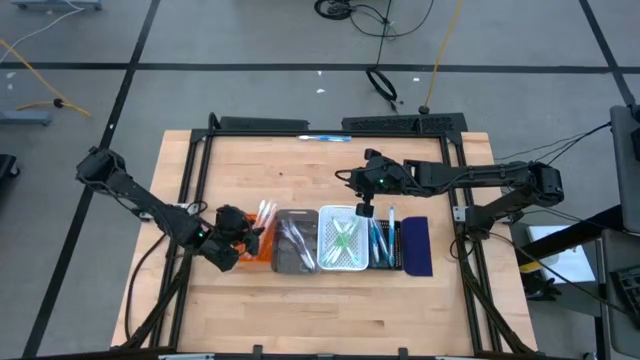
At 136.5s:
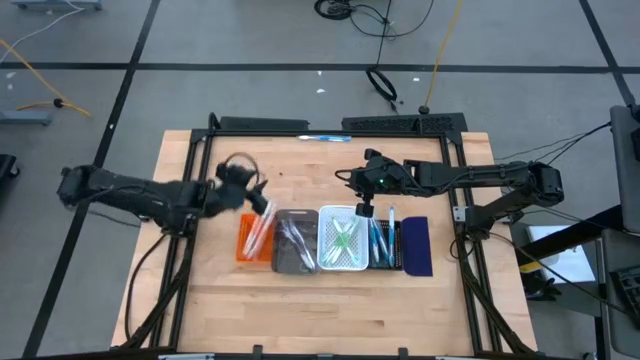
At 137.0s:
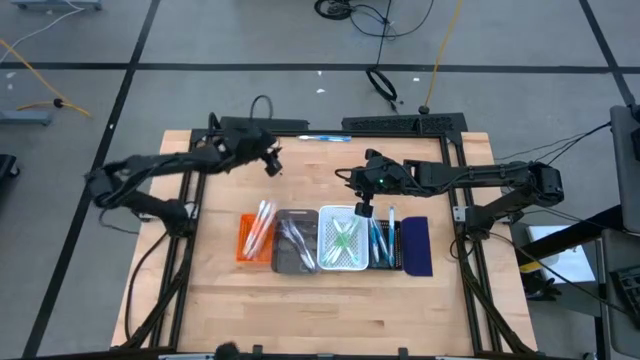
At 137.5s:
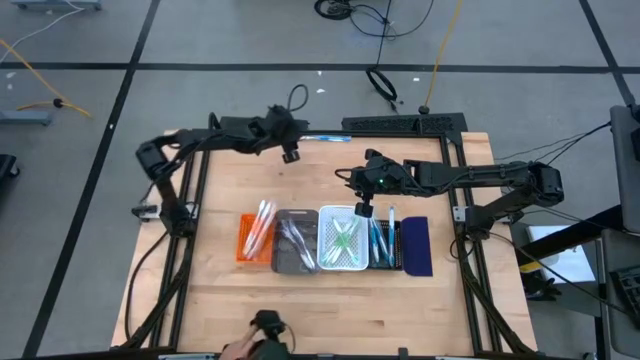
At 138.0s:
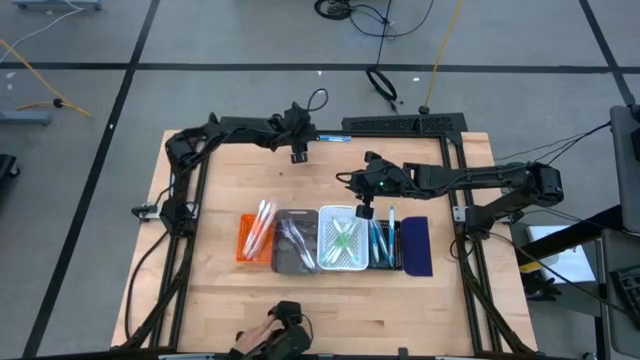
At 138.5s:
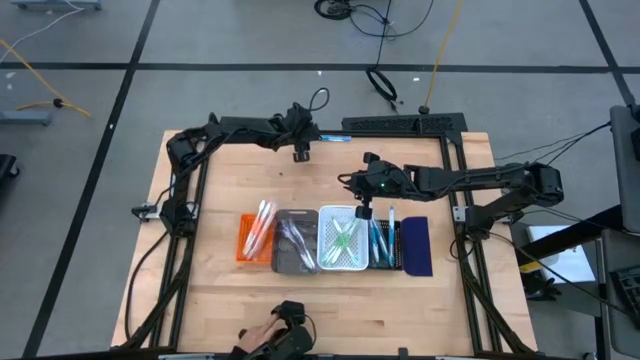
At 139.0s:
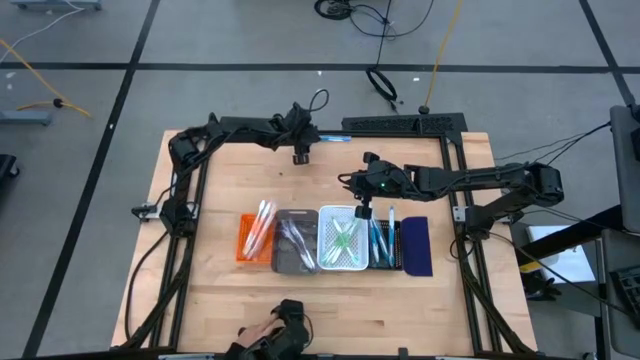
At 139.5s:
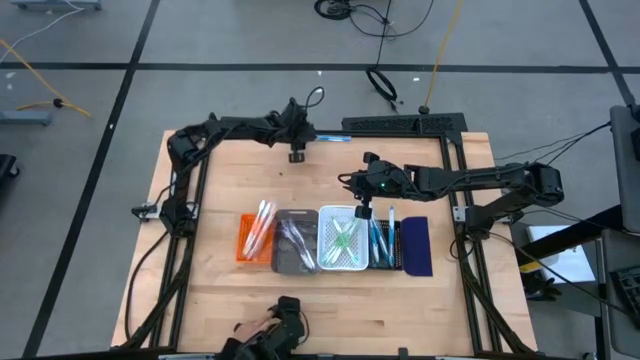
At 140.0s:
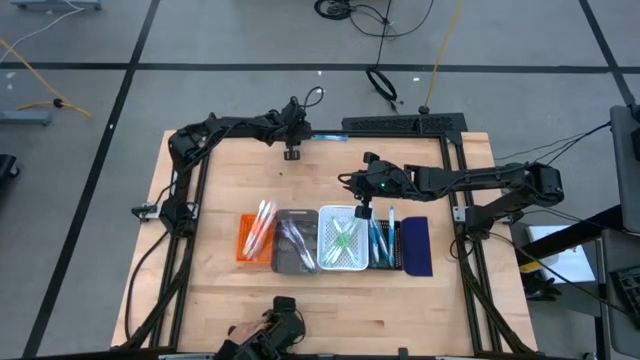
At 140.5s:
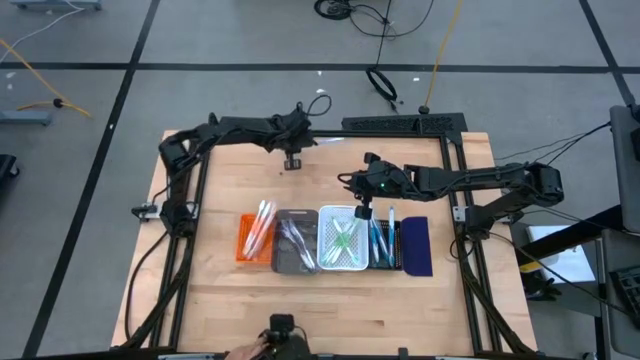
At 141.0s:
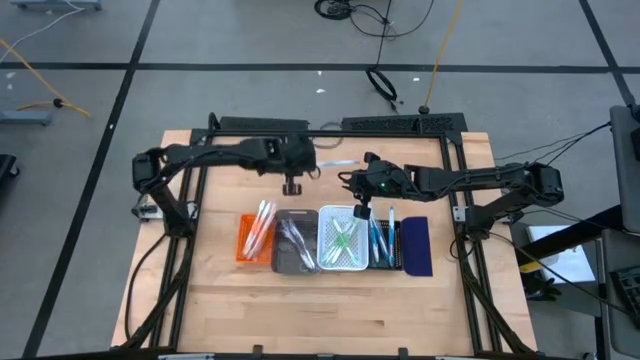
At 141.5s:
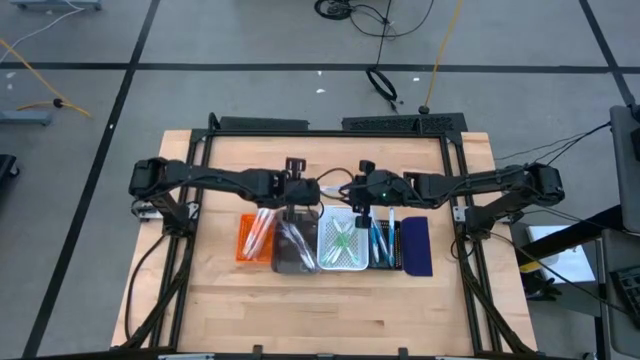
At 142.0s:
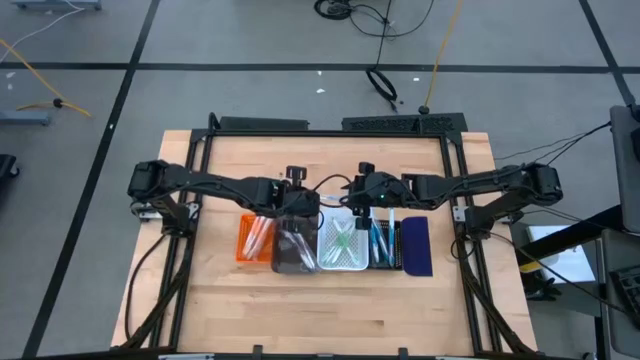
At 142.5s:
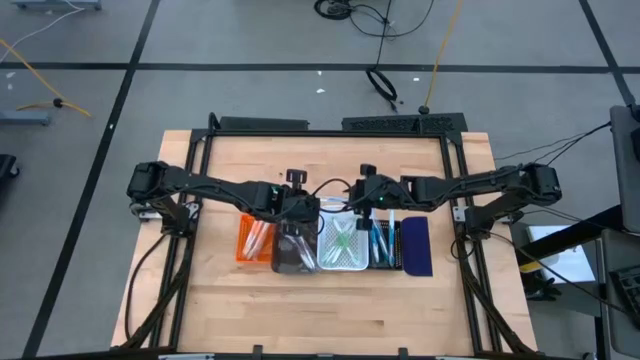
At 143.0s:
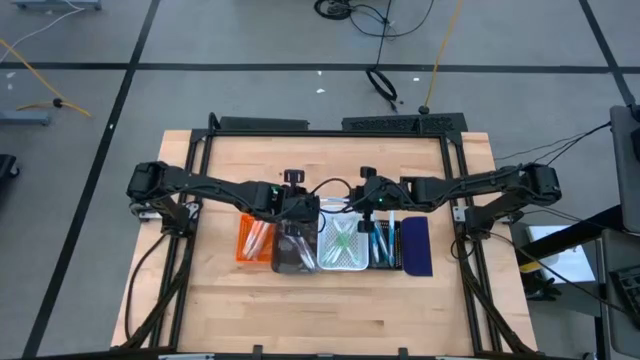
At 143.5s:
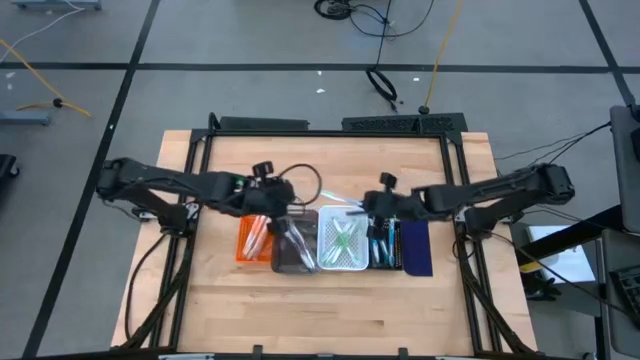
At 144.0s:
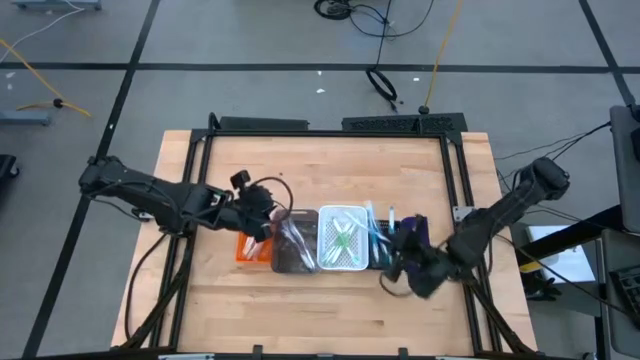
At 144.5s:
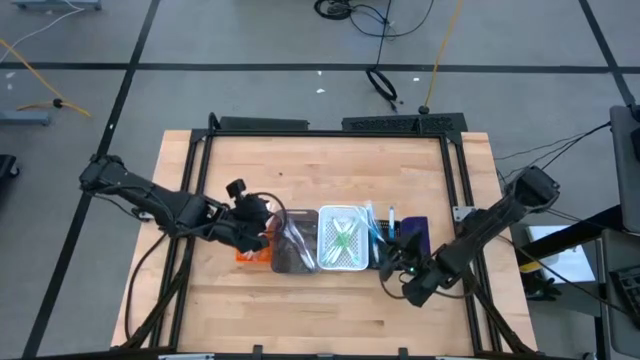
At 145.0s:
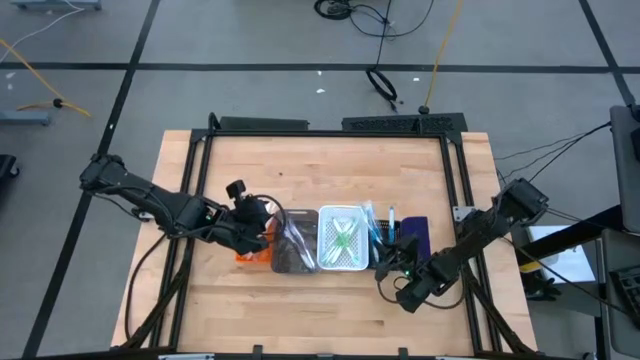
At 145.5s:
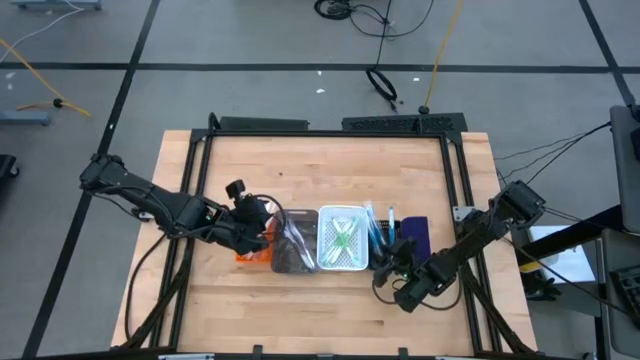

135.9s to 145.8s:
Task: Pick & Place Toothbrushes
Put the blue toothbrush into the right black bin

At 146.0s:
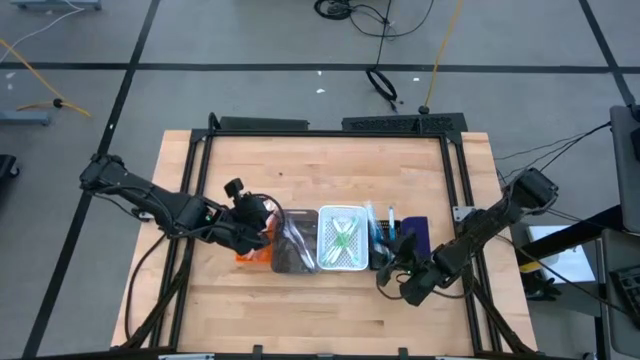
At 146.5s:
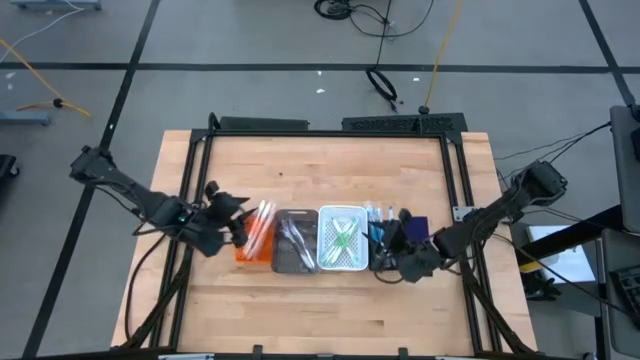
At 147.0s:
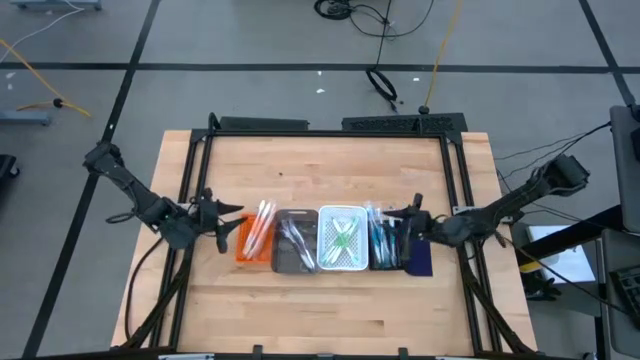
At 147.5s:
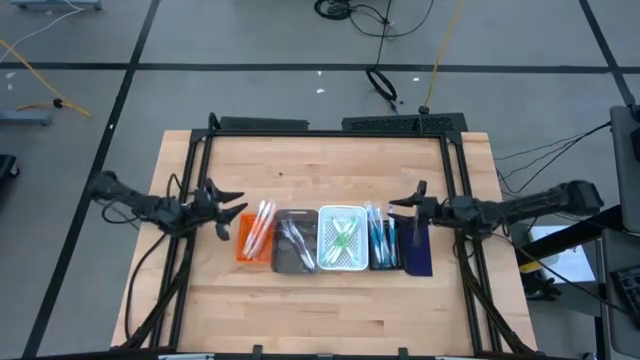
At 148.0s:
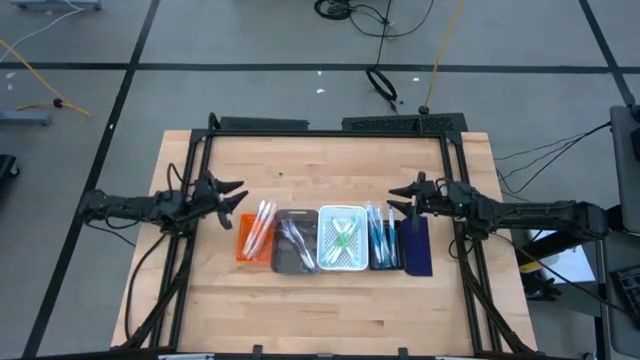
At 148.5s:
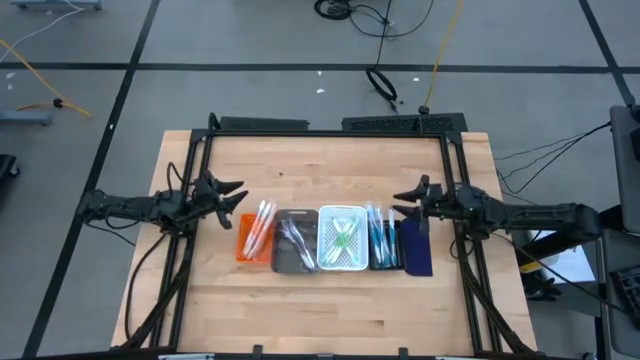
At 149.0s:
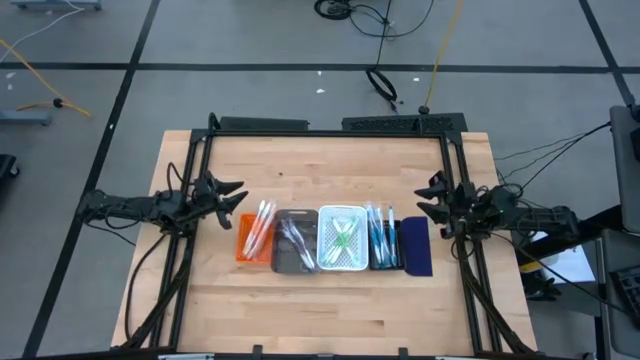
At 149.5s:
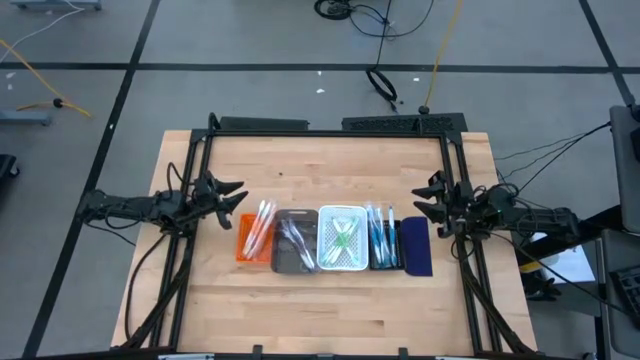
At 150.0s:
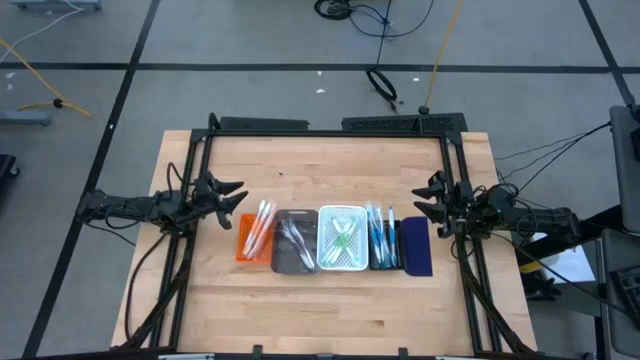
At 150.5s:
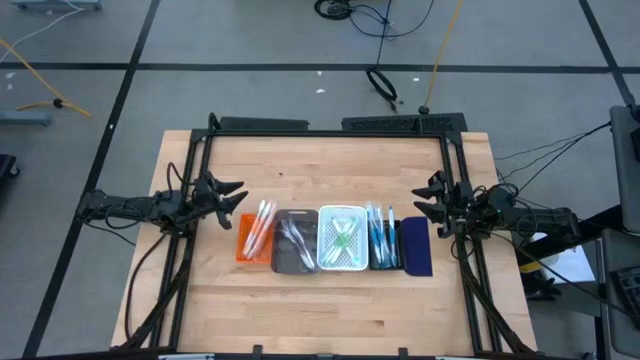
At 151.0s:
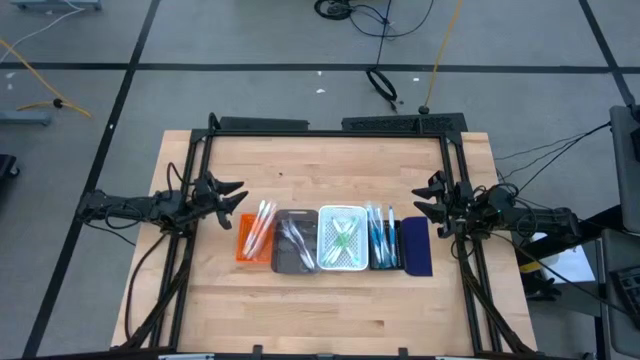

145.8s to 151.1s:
Return to Home Position

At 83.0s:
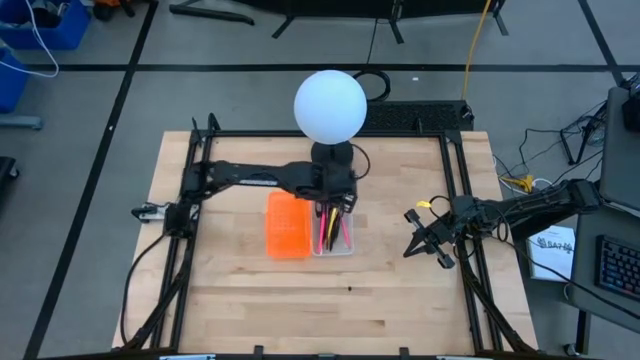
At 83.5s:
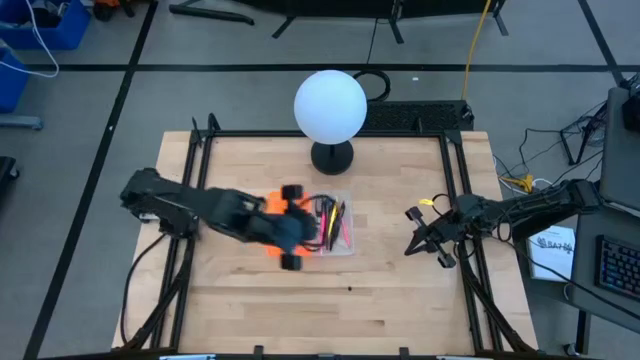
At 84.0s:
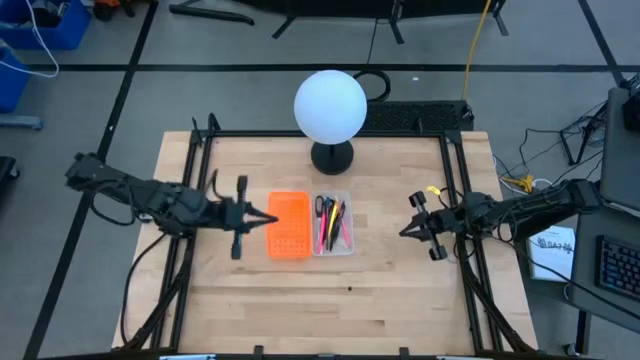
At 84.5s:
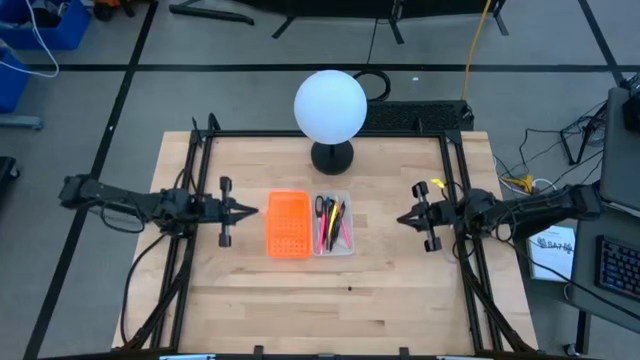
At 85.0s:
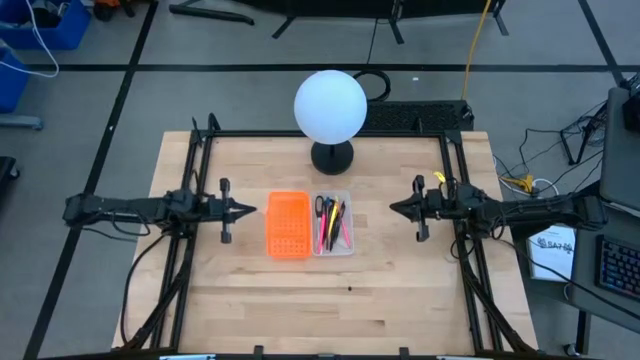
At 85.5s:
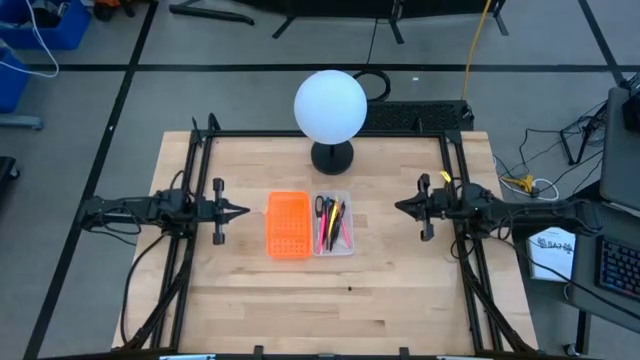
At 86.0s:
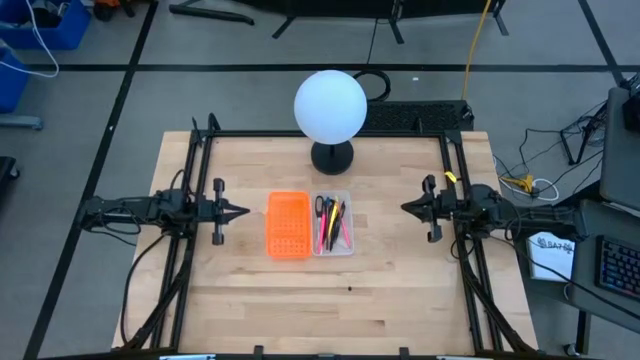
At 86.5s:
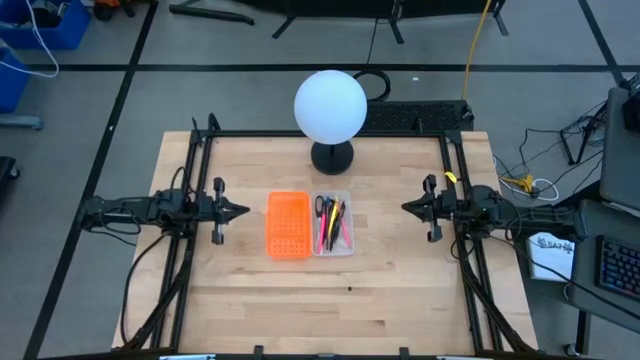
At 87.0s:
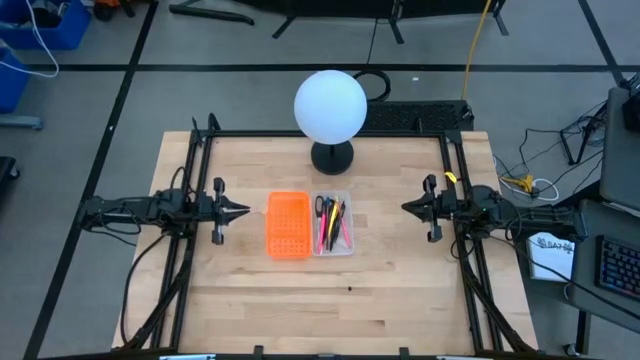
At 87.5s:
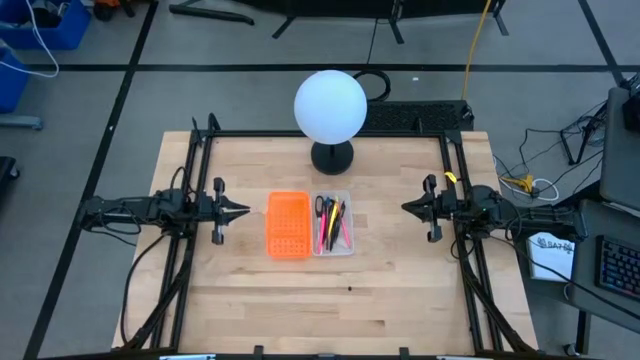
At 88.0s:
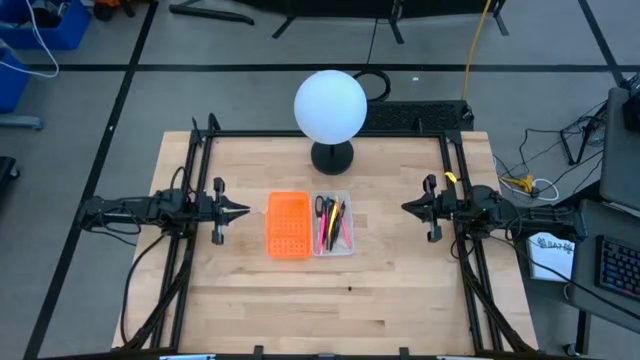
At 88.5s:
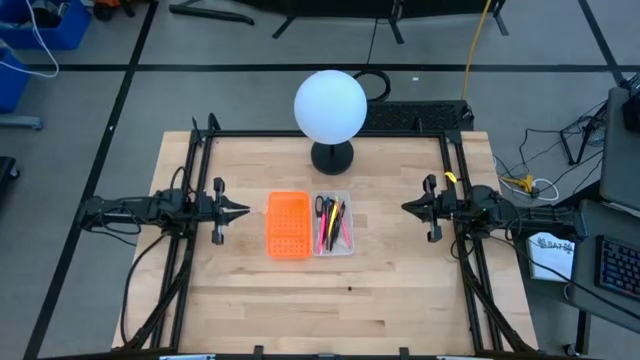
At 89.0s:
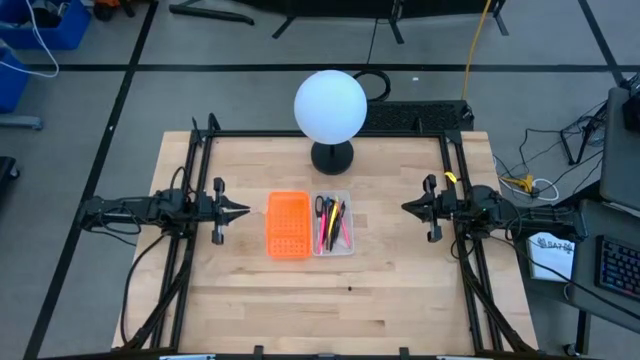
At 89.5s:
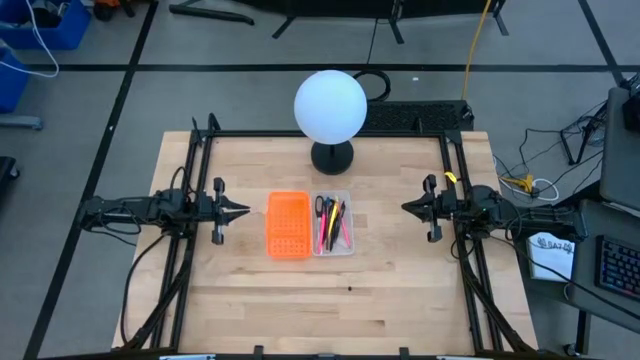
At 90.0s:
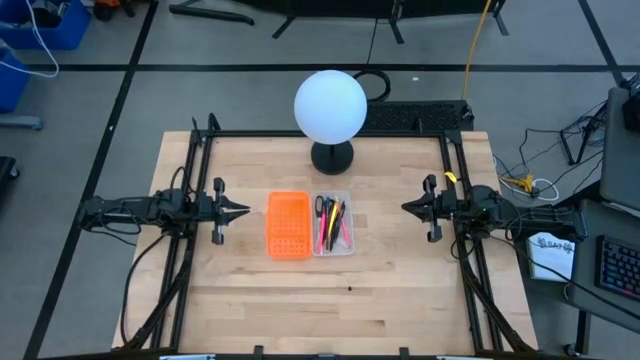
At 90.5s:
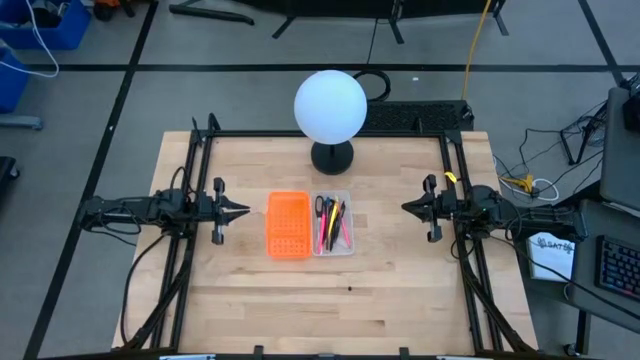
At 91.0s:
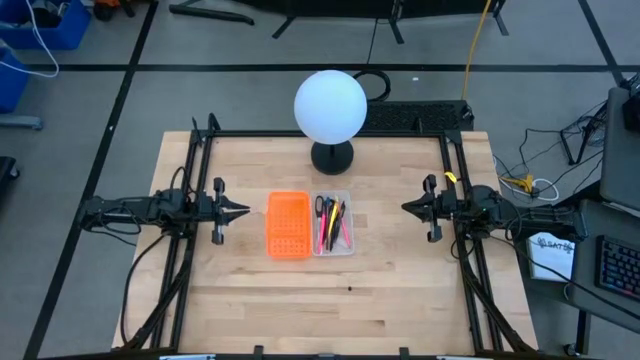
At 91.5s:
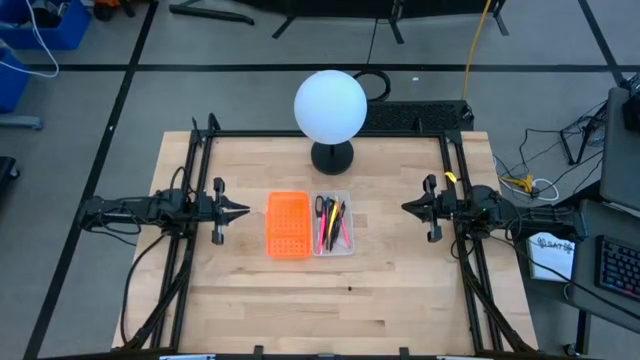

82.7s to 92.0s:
Task: Pick & place school supplies into a supply box
Return to Home Position
